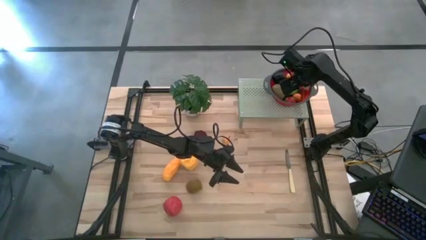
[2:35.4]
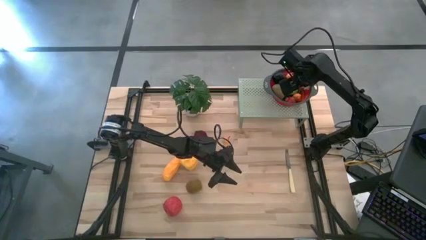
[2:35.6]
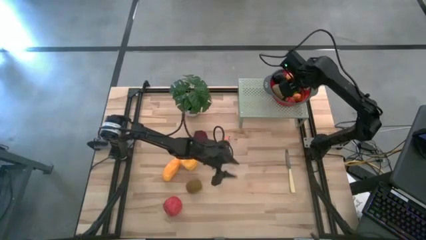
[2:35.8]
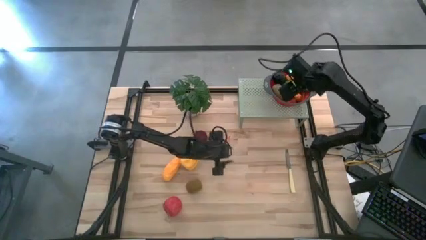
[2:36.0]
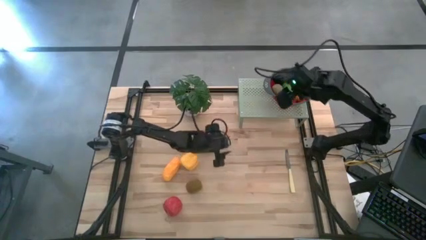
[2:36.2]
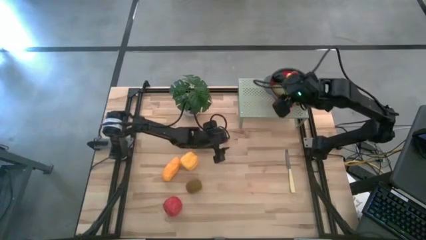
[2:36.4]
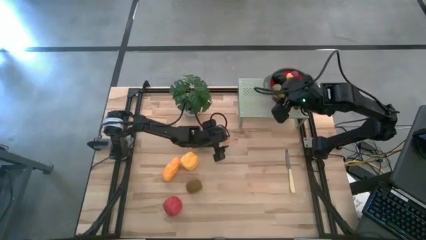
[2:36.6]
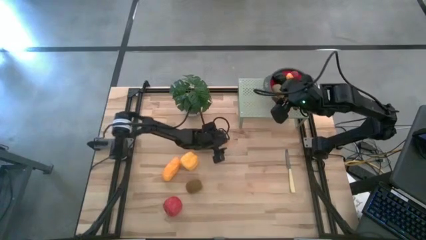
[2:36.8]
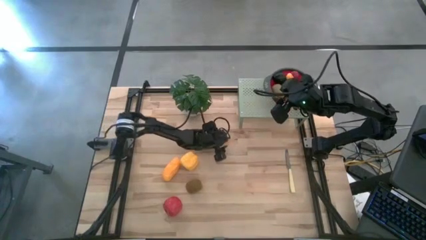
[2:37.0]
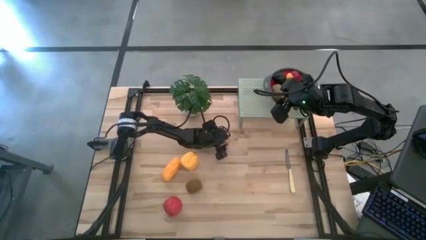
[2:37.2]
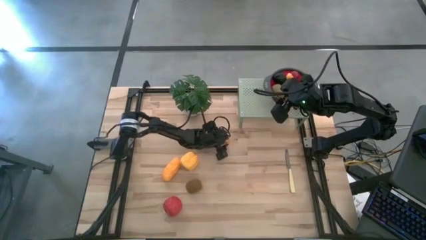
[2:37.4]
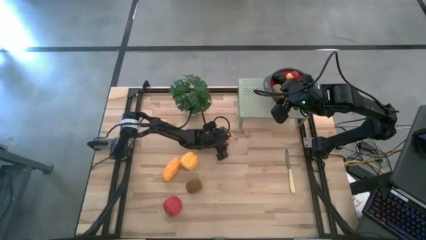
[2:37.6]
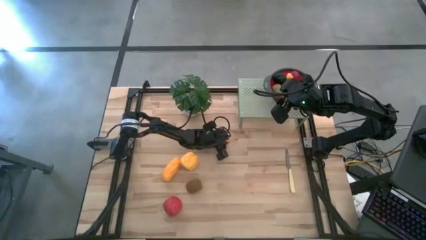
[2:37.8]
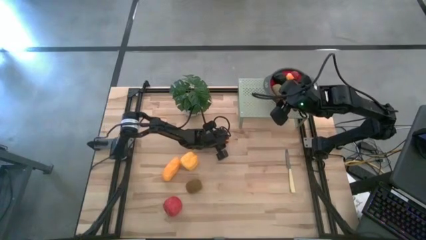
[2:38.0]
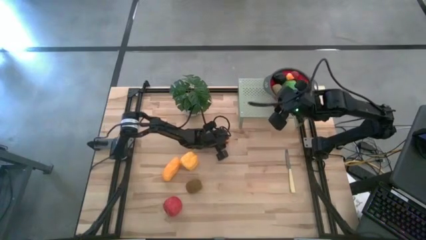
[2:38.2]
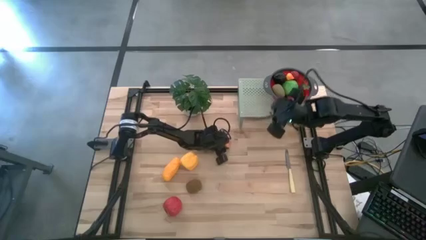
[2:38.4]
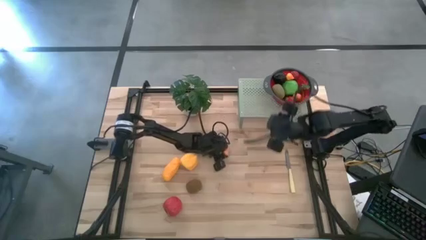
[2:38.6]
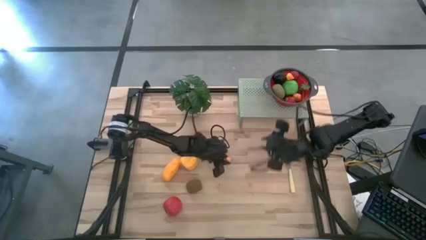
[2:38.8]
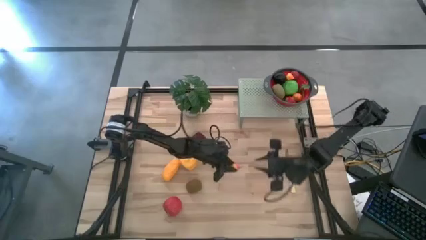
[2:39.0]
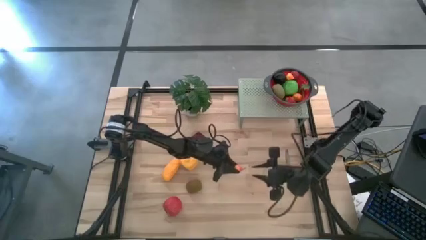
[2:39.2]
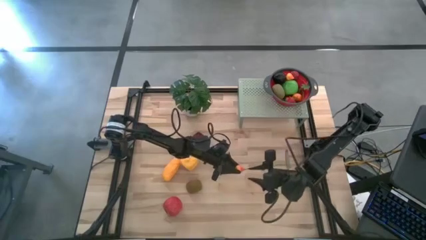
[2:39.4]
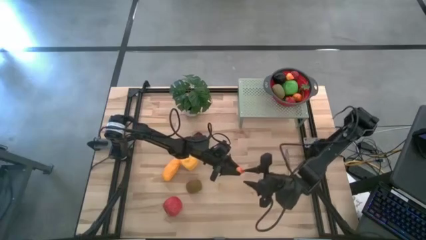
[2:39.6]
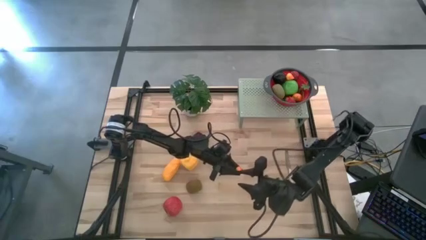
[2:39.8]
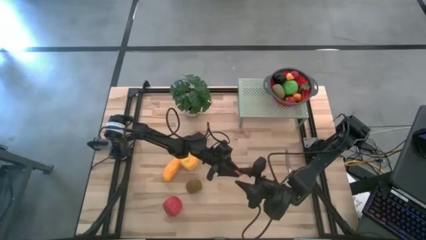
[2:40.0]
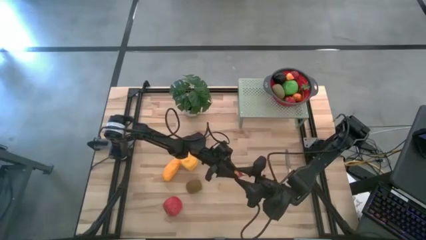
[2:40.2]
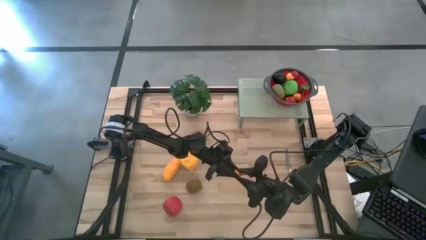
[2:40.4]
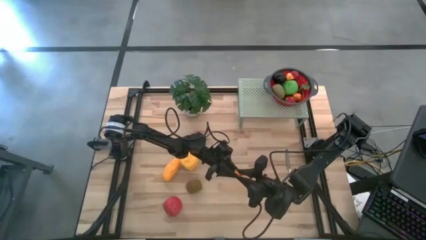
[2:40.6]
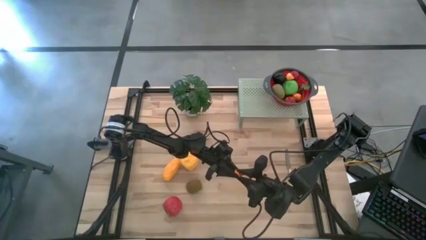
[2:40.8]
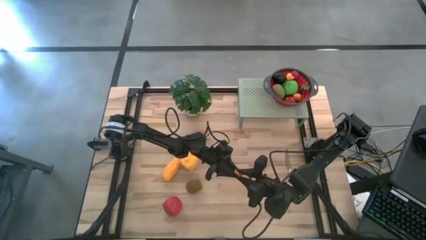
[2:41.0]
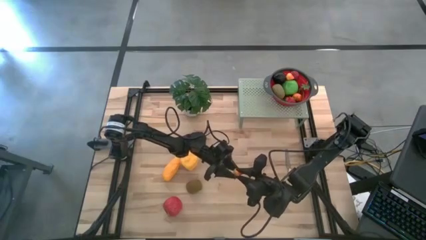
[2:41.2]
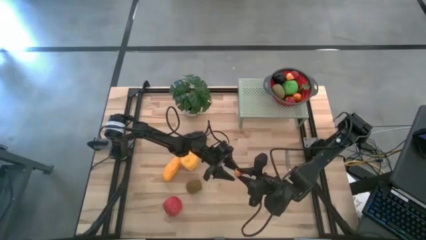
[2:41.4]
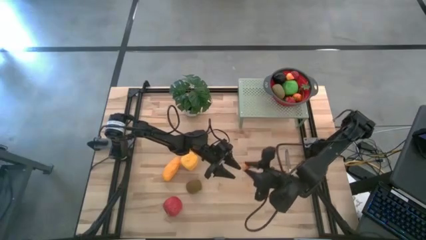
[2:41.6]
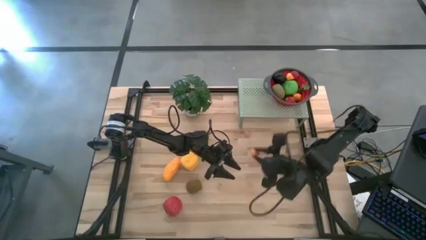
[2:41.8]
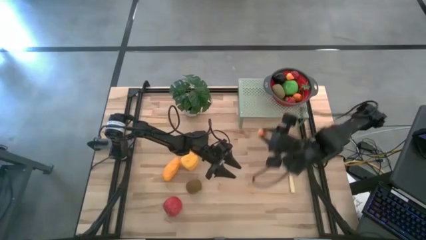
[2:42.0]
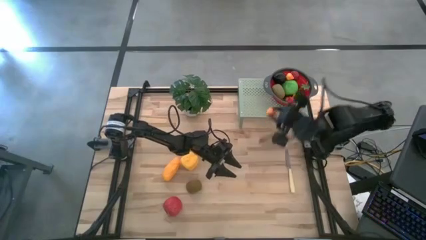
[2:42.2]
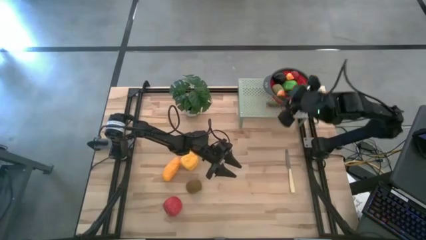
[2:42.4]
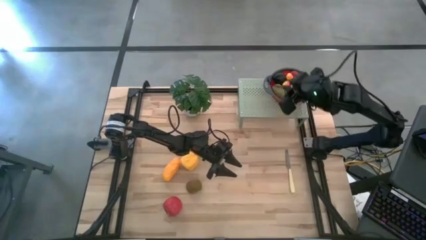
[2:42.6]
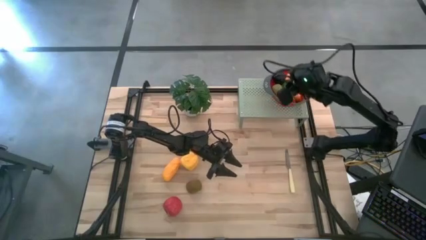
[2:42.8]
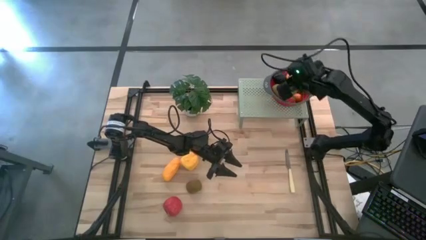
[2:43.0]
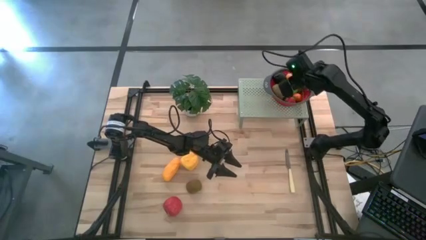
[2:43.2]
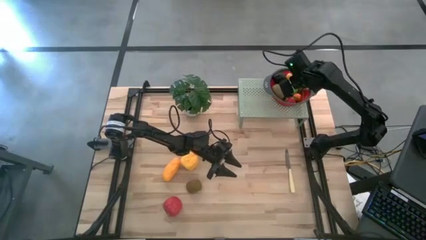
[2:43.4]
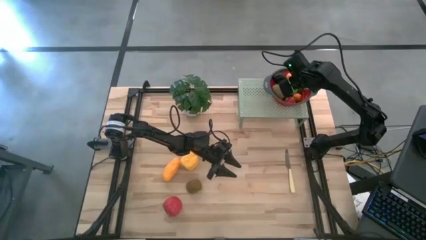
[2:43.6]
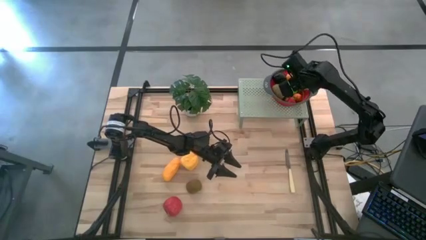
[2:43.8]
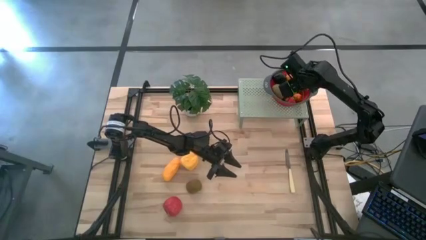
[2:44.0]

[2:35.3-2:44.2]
Task: Pick & Place Fruit
Put the orange pear into the red strainer bowl on the shelf

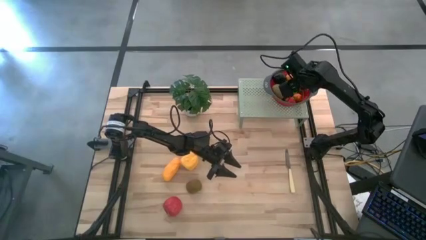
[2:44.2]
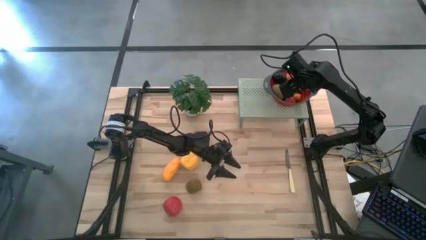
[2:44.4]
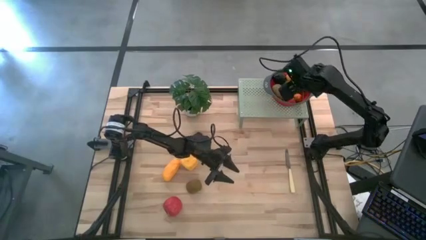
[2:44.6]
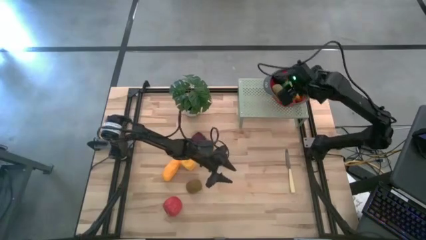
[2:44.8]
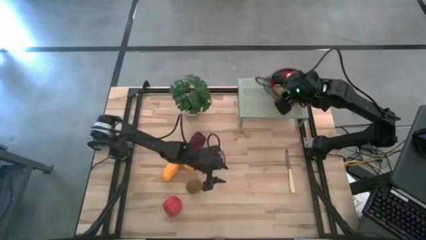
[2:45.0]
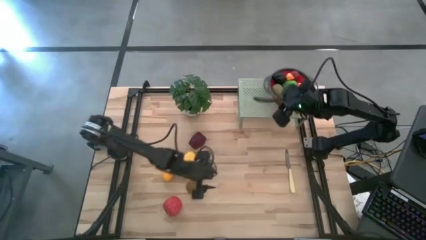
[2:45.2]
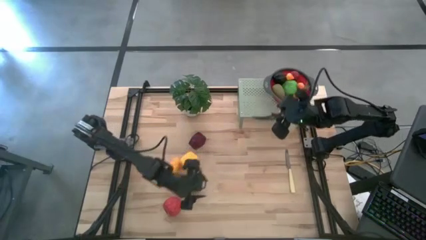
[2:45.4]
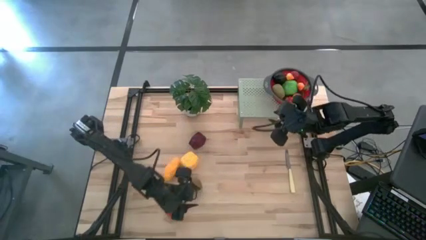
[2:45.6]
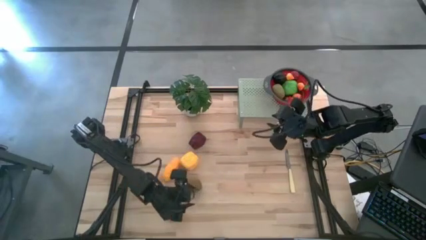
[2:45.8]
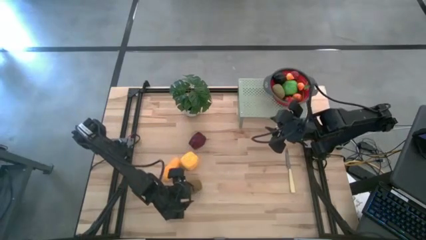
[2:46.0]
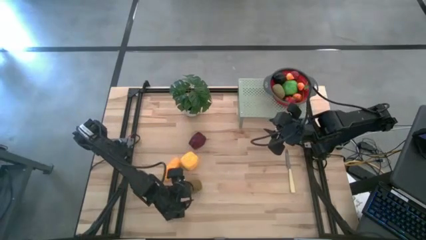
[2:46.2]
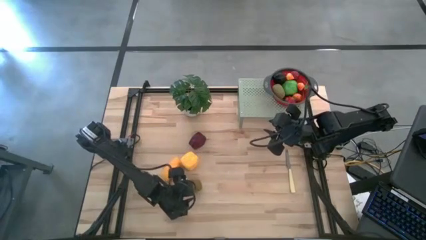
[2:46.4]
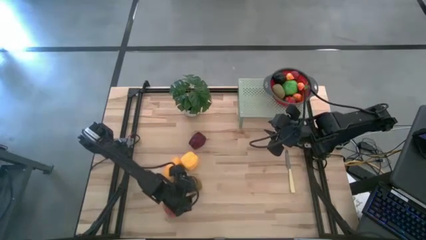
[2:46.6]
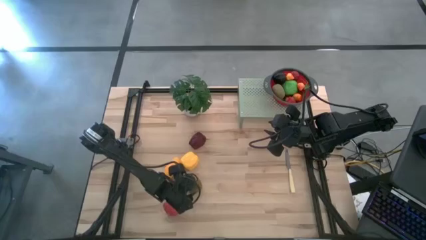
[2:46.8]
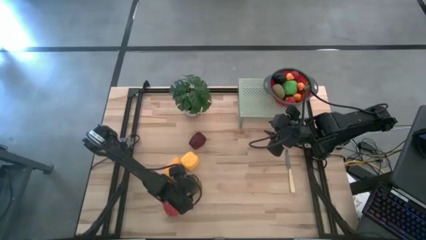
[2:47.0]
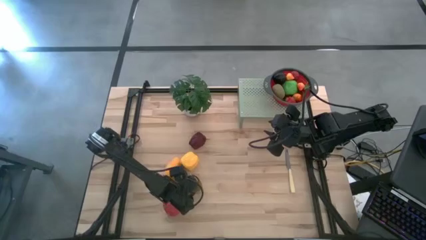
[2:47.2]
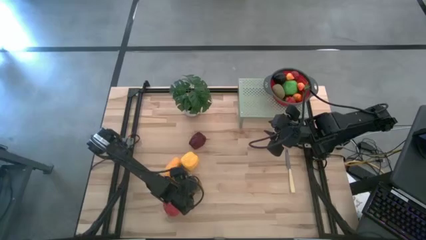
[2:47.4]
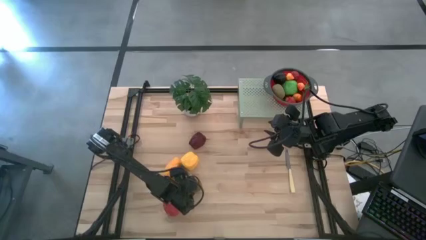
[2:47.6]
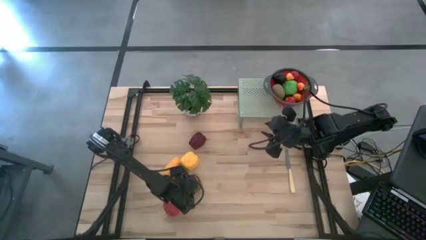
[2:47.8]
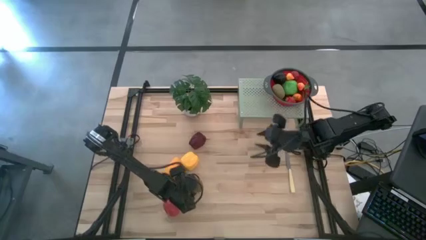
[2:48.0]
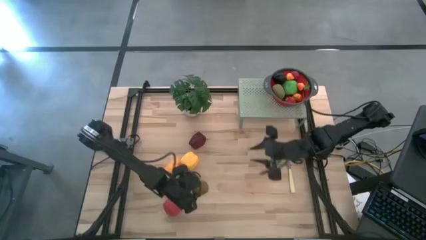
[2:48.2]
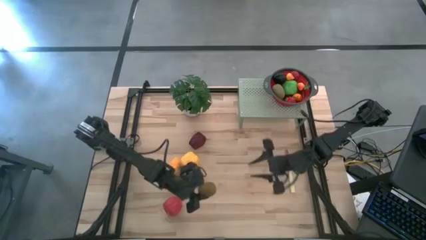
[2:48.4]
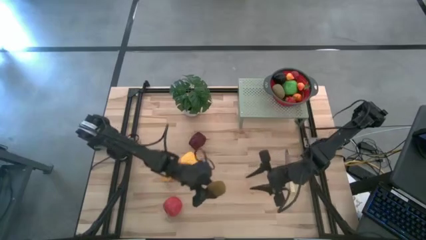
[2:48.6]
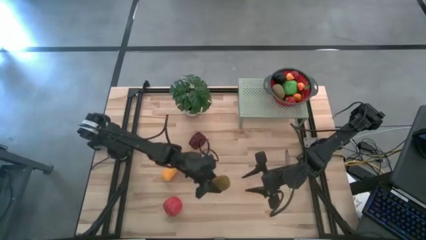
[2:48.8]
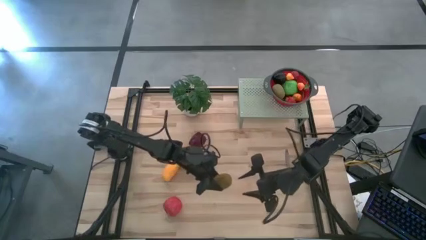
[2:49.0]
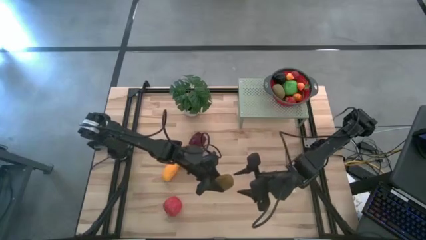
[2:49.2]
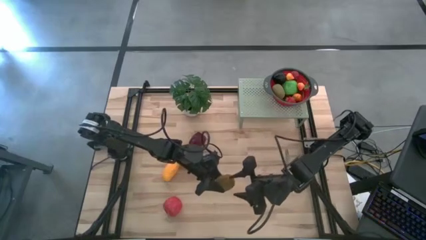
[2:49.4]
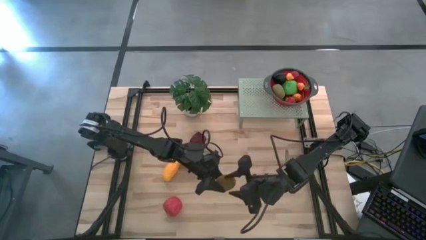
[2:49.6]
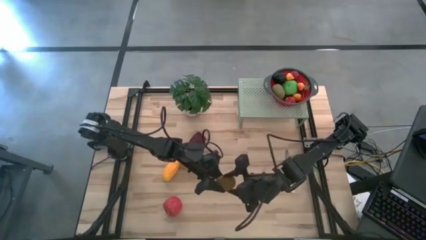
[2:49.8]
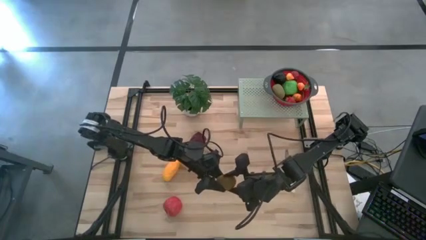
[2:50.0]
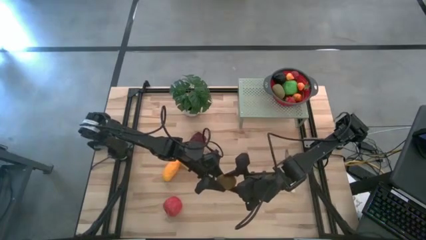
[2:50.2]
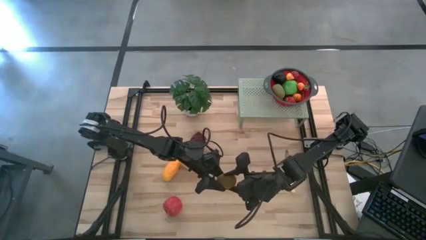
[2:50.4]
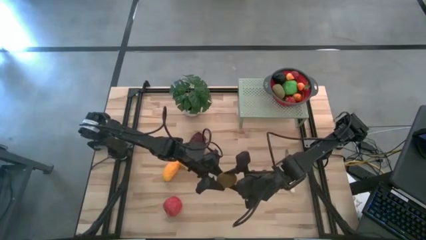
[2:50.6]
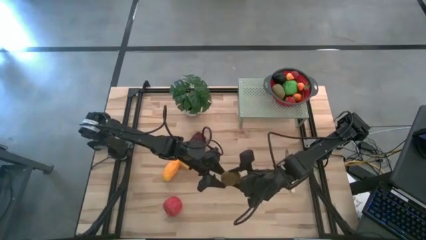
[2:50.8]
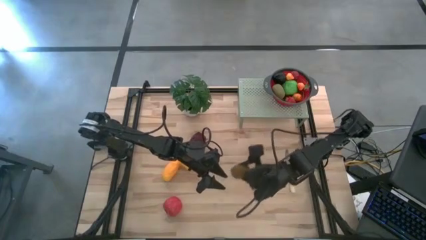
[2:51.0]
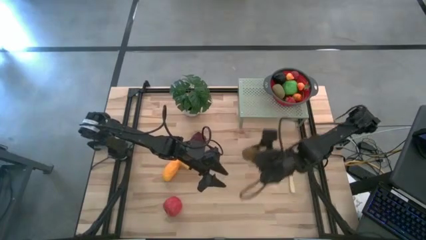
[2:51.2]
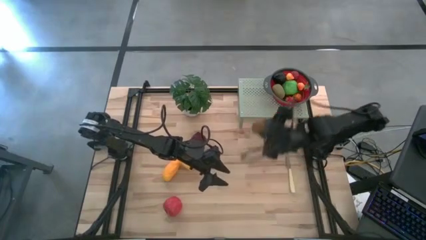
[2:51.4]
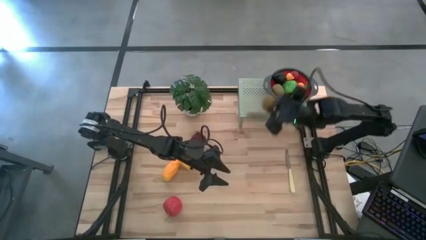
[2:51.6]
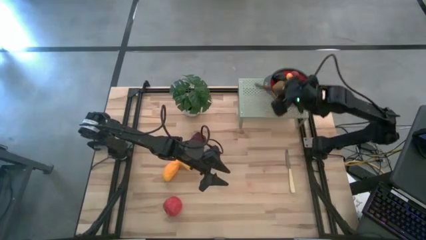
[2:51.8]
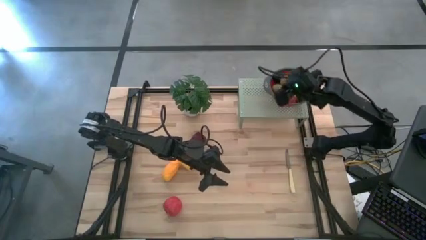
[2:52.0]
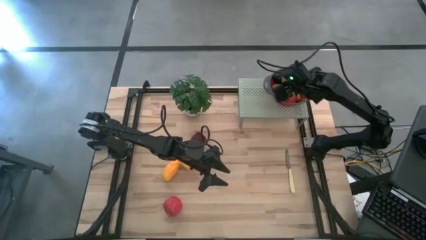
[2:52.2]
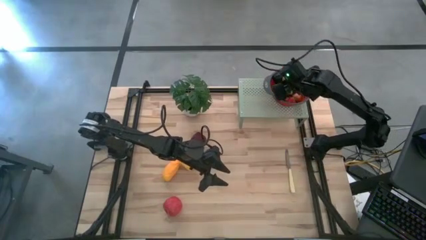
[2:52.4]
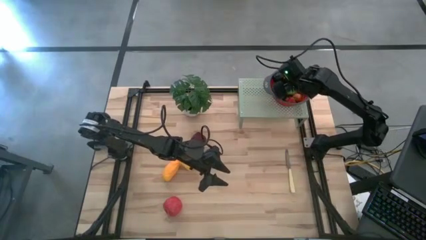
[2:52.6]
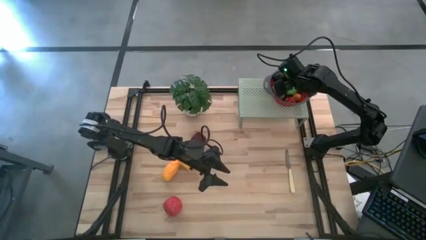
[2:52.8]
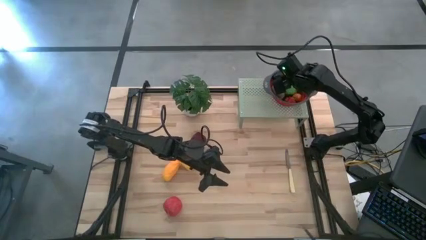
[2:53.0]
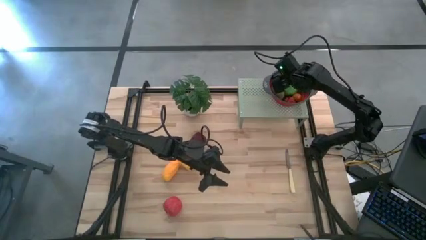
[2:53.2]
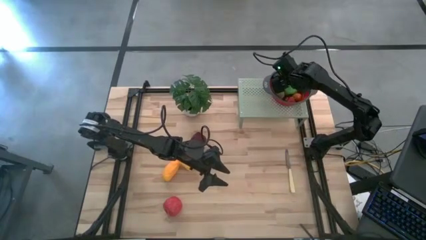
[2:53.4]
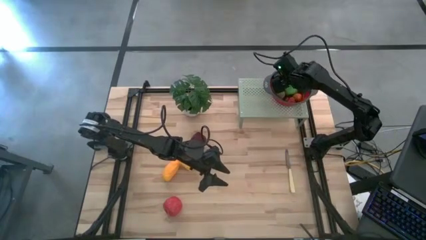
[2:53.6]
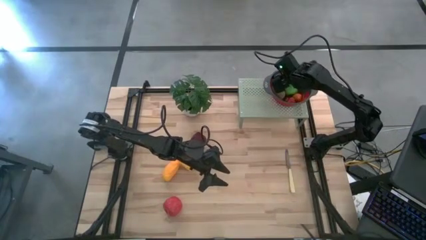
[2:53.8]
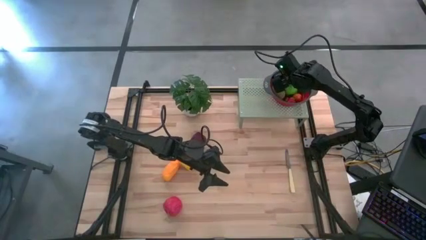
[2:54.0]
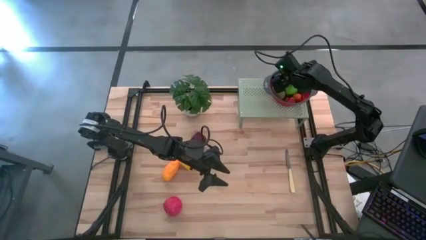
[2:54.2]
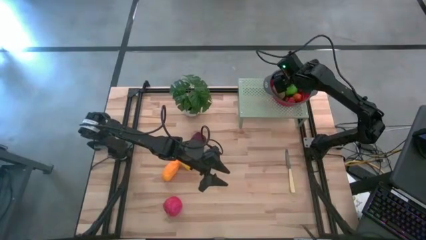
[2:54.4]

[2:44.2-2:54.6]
Put the brown kiwi into the red strainer bowl on the shelf
